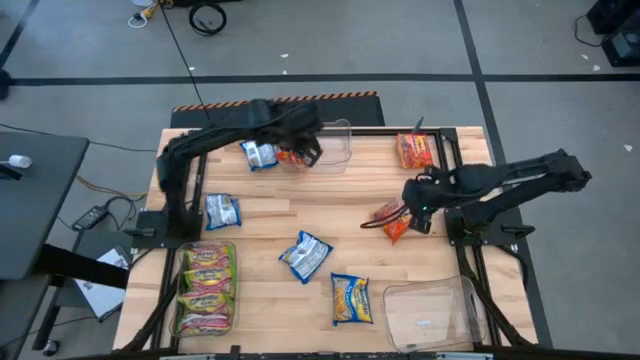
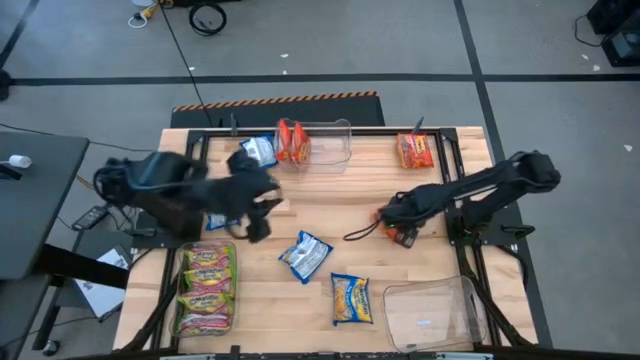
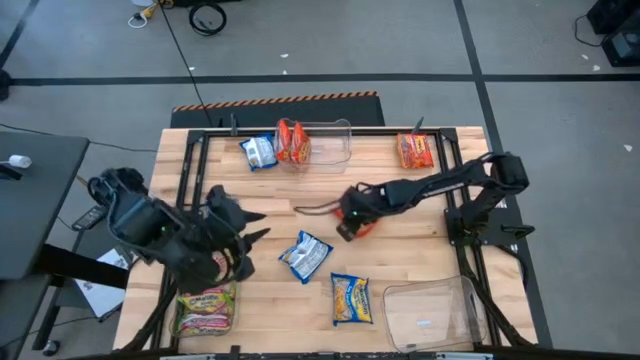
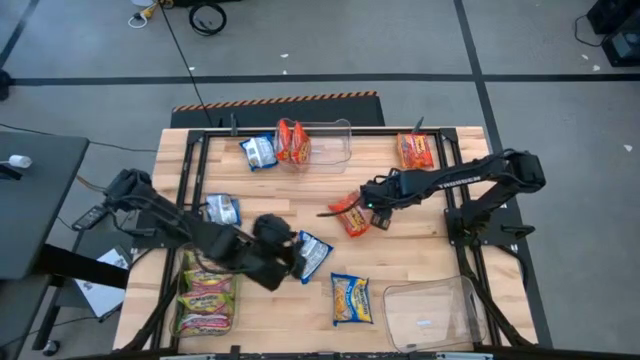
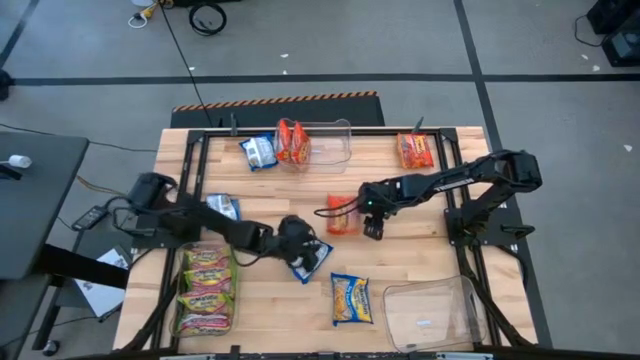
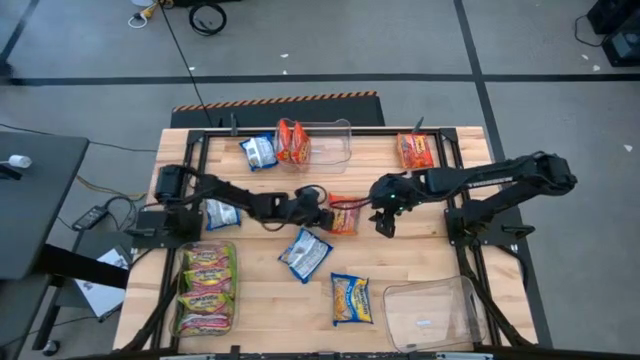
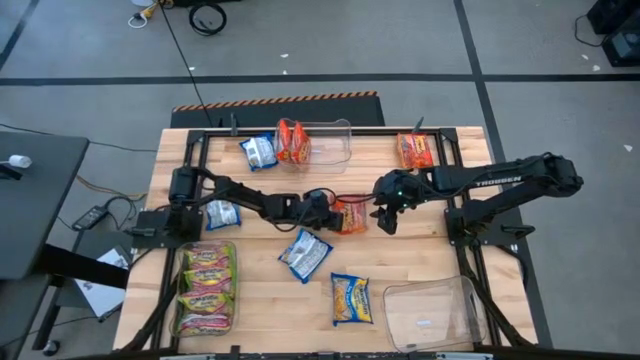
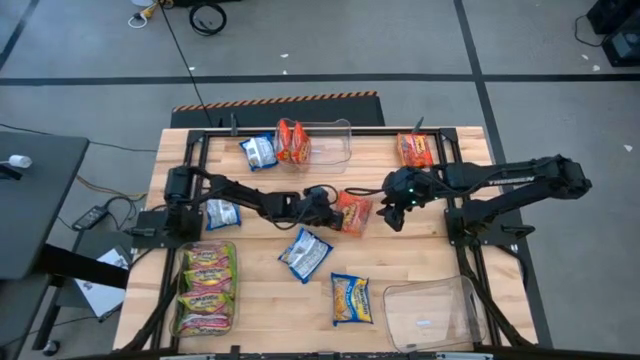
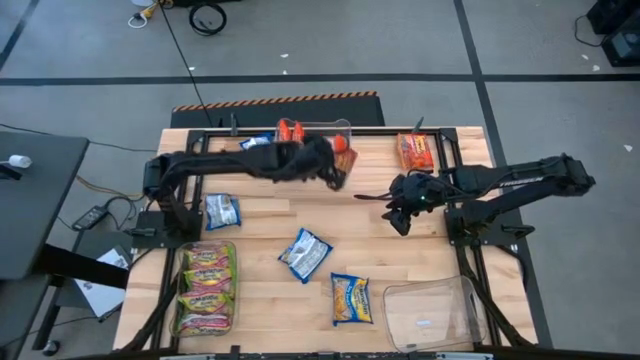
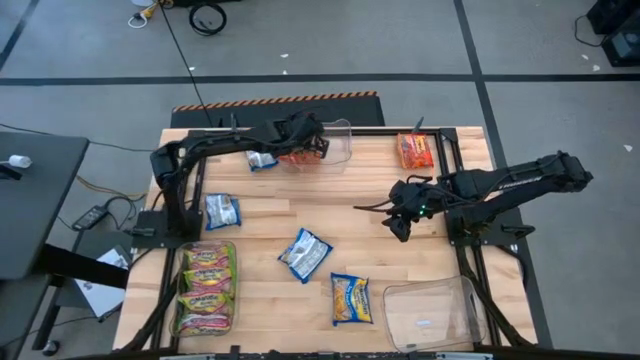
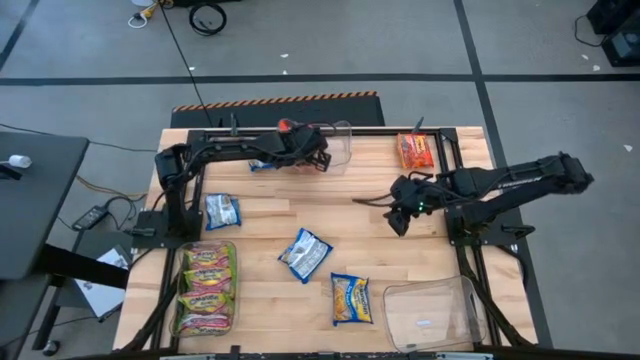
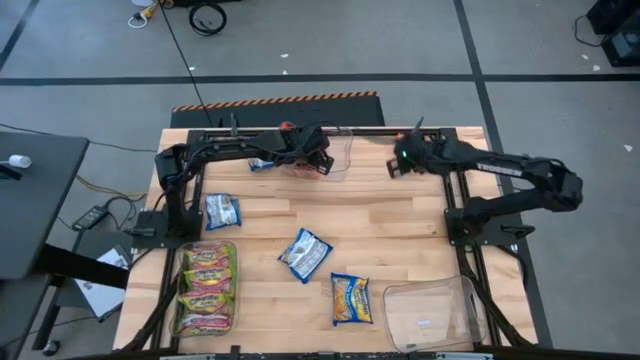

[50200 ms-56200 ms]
Task: Sort Maruchan noodles
Put the orange noodle pack into the top transparent bin

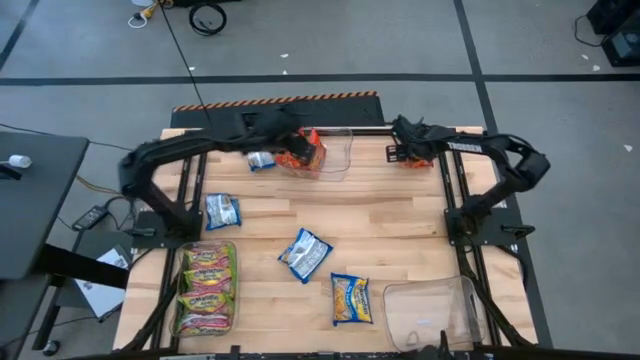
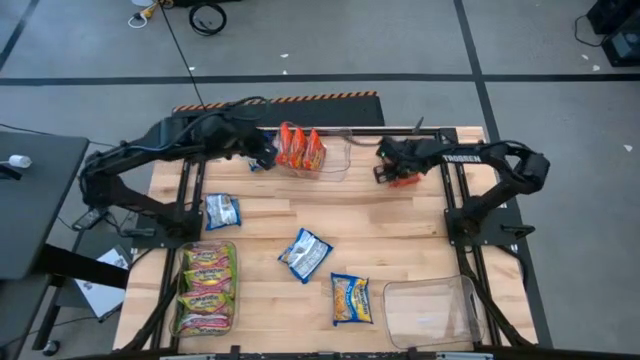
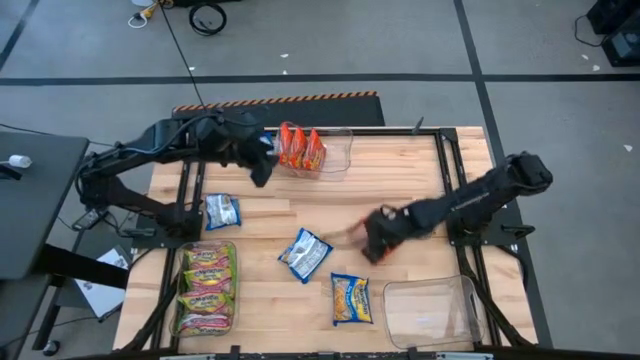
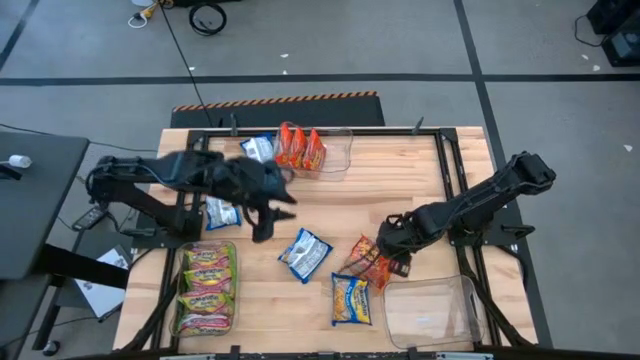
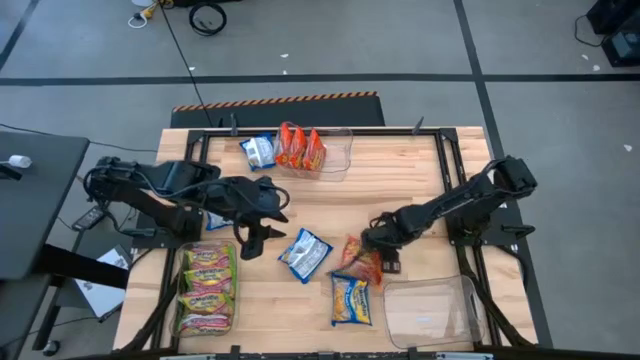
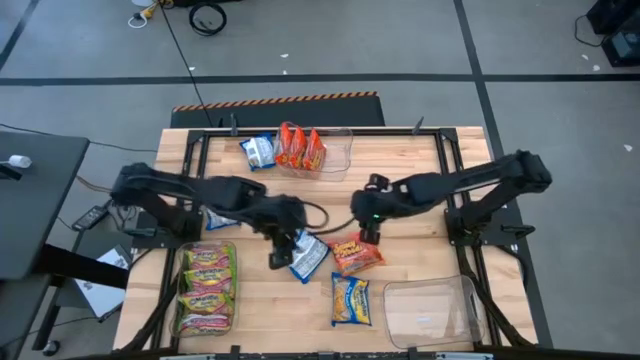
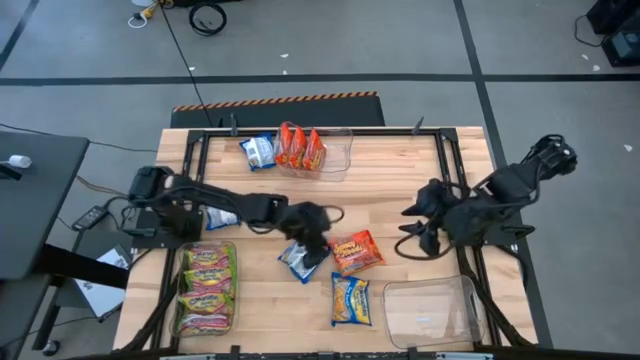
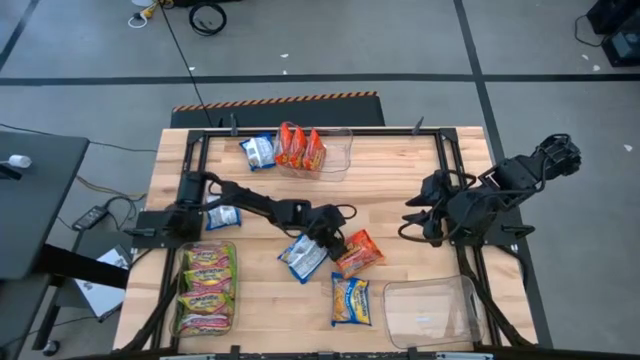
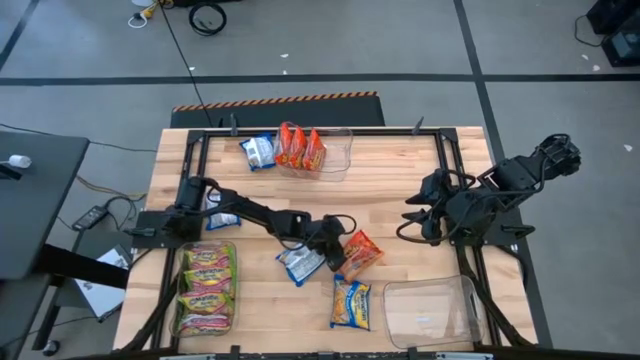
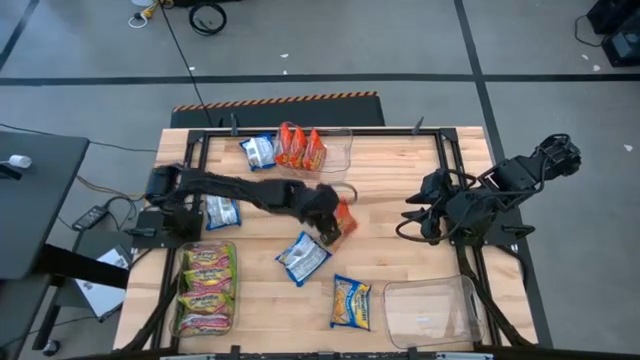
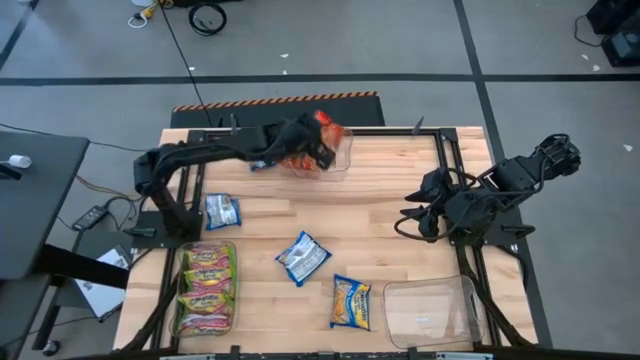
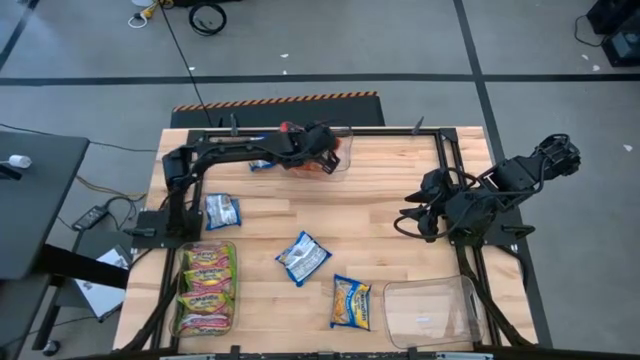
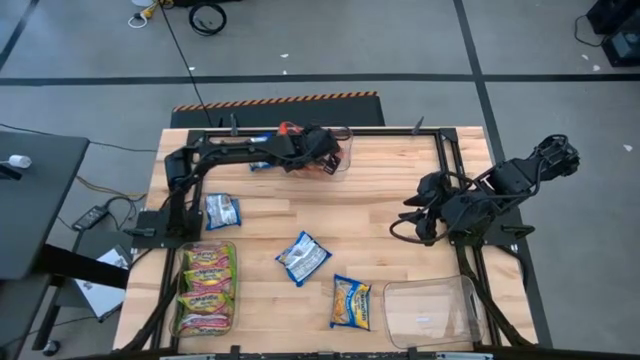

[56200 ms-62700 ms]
Put the orange noodle pack into the top transparent bin

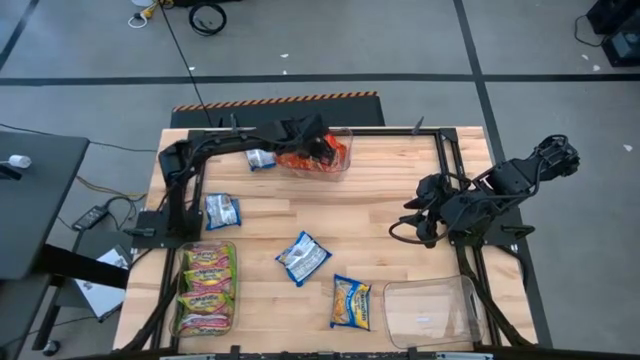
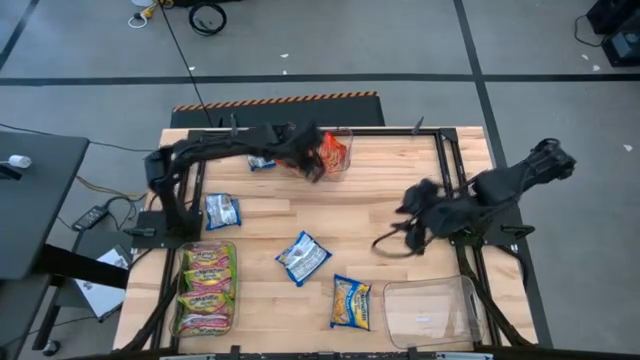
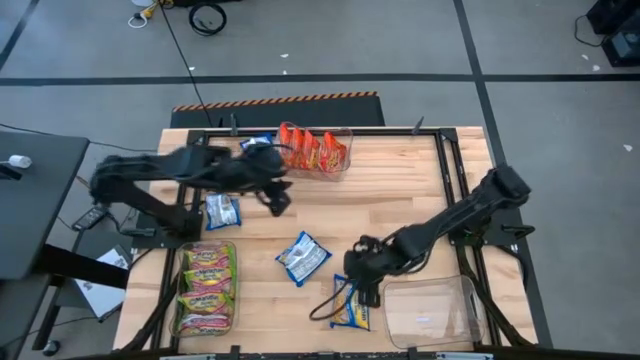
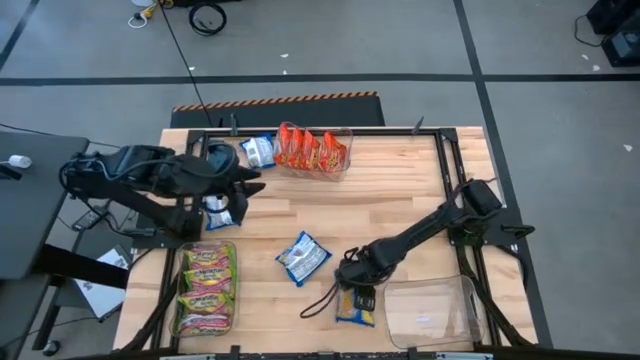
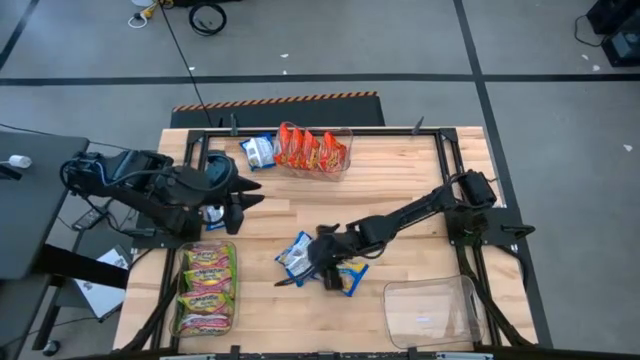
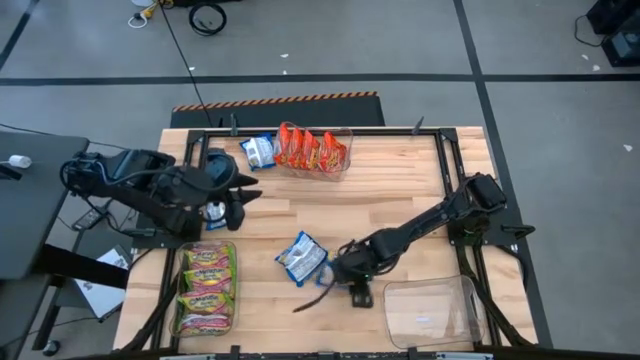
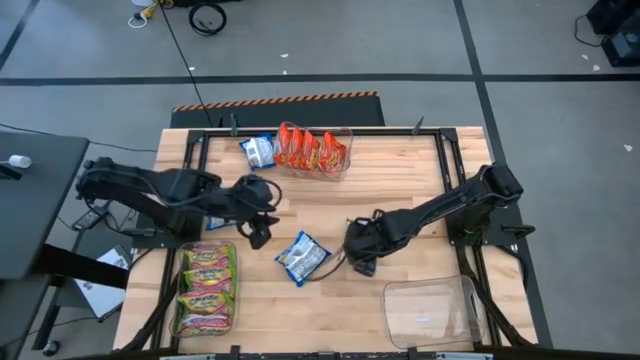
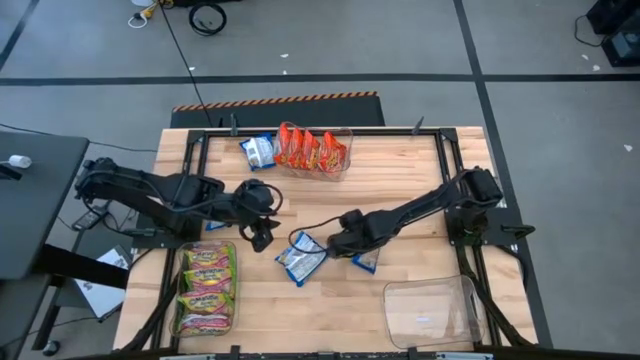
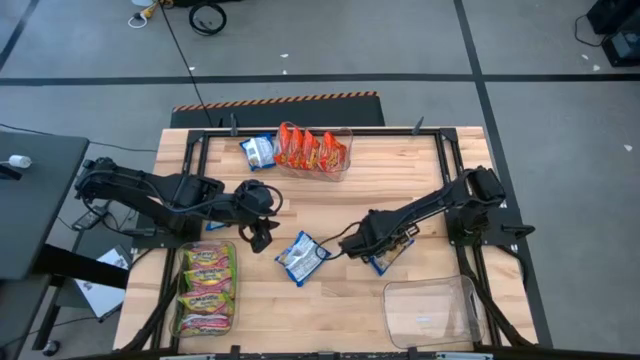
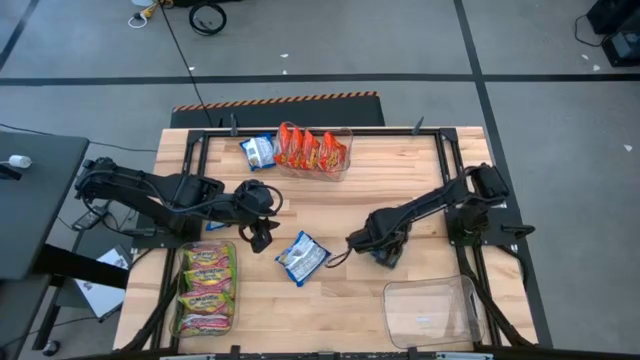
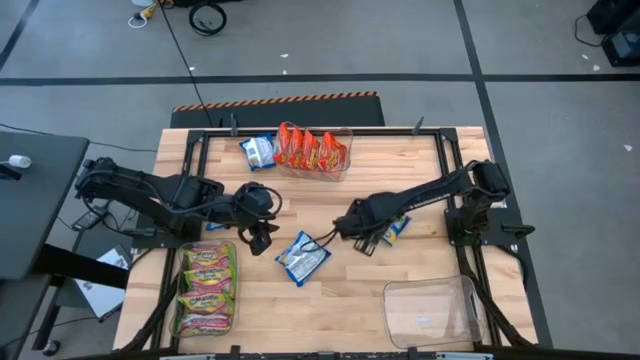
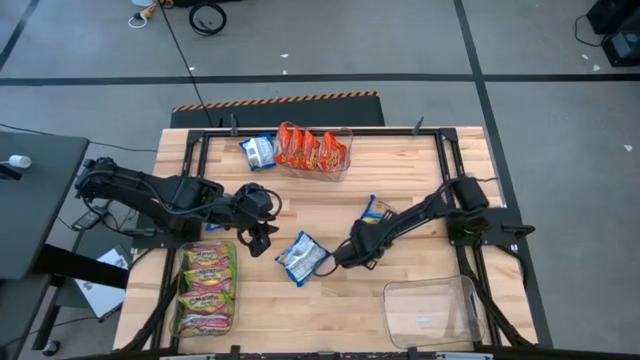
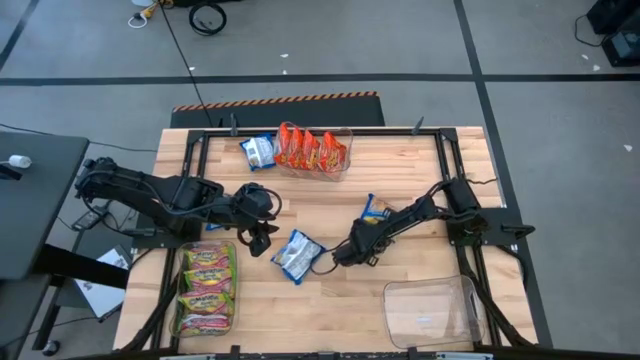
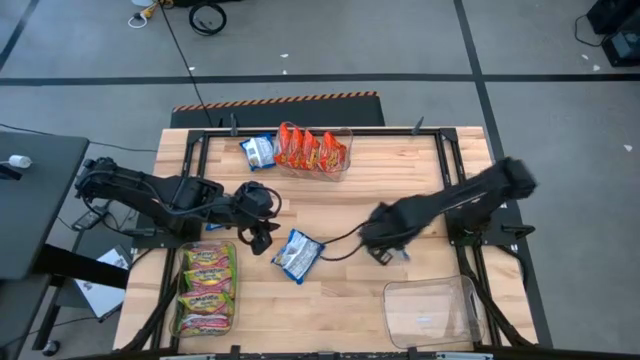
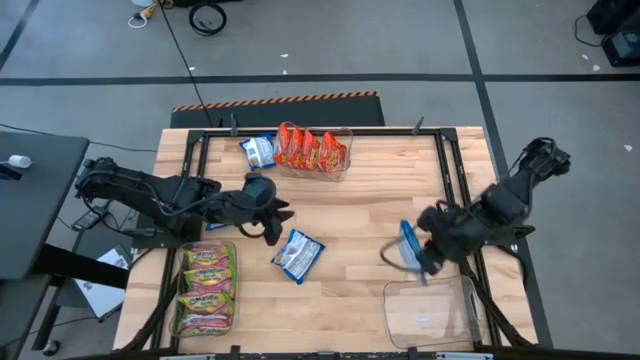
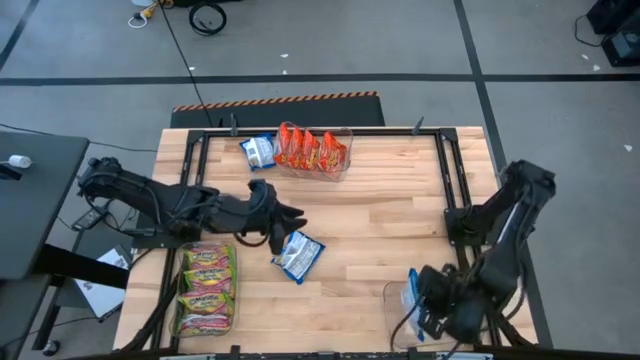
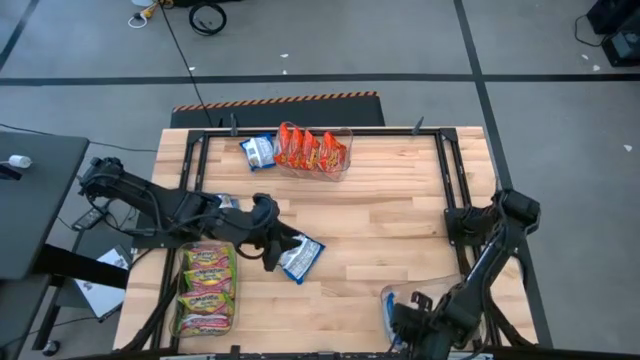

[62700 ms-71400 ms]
Put the blue noodle pack into the bottom right transparent bin
